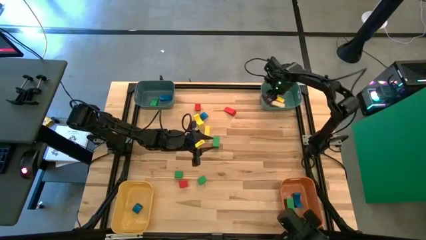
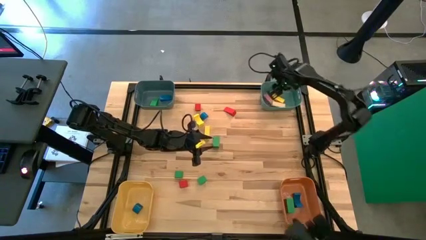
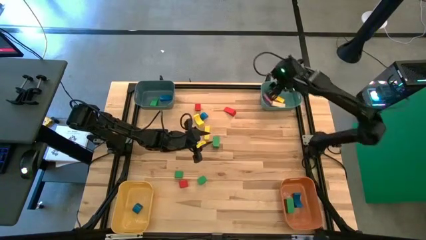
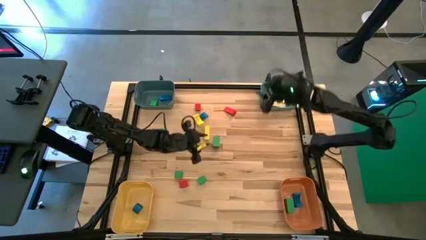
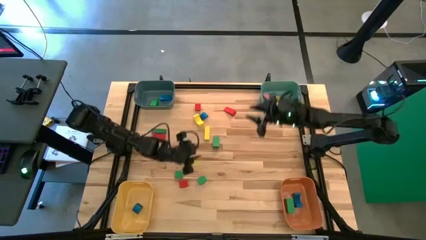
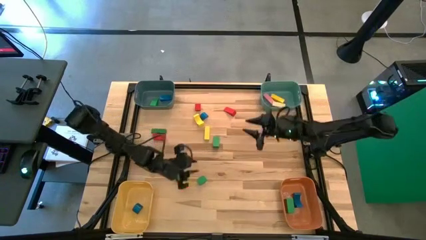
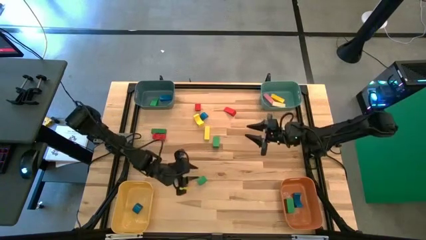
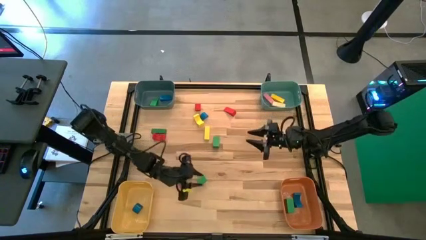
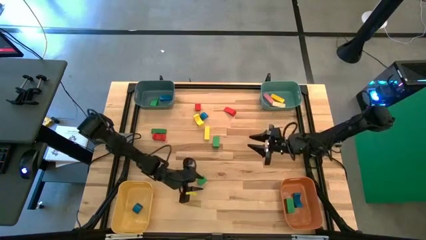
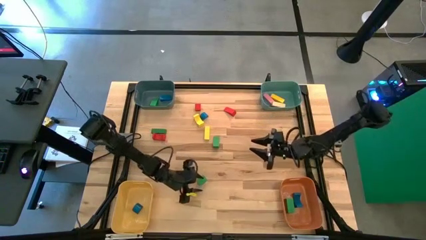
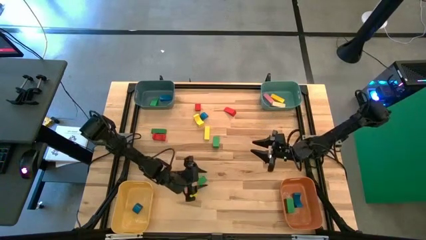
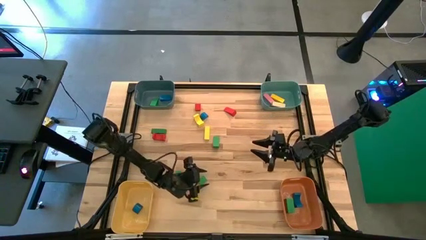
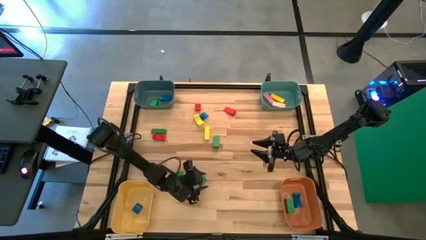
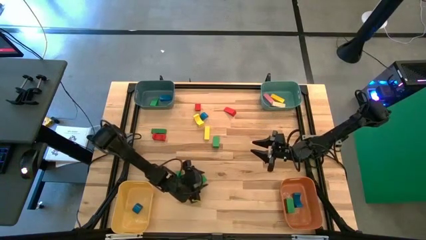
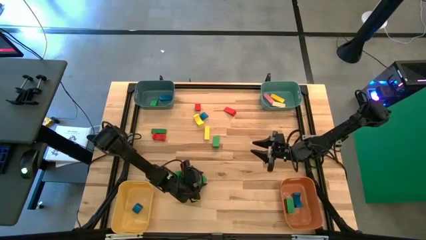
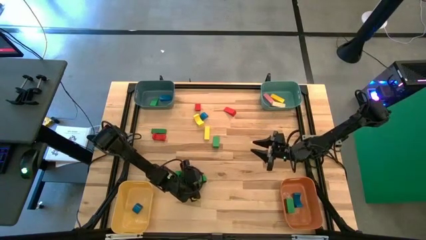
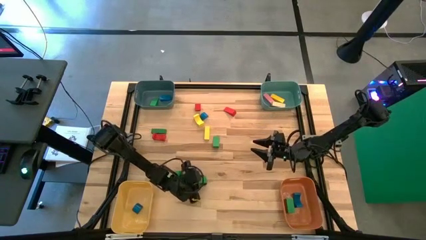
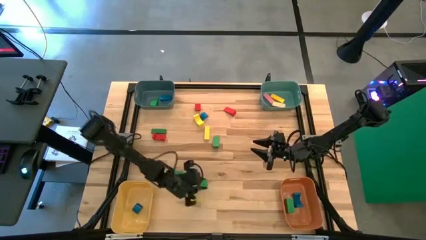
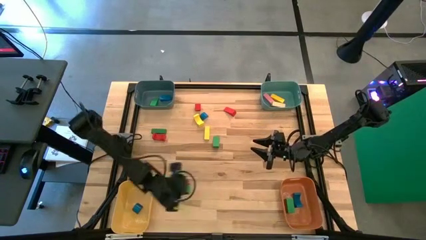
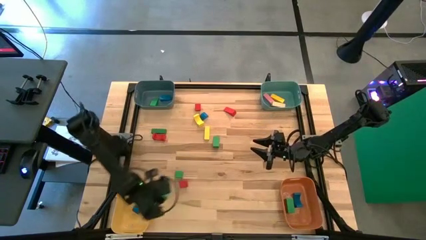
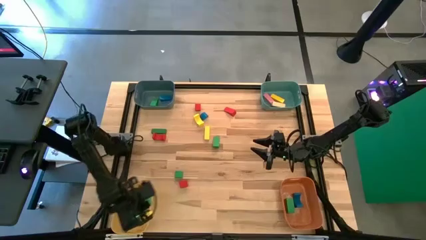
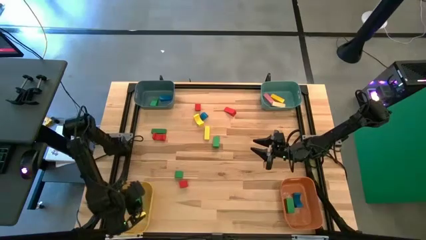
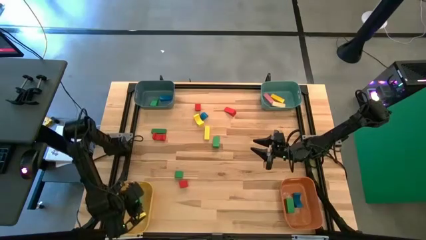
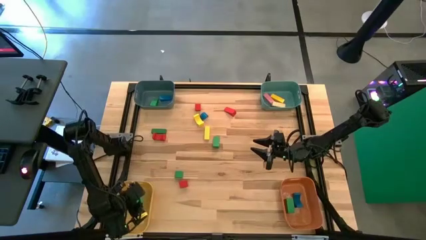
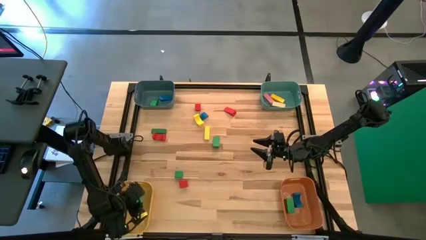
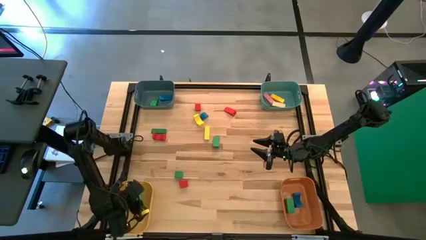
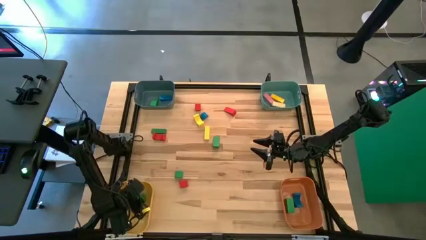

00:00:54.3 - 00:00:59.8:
Task: Sort blocks by size
Put the right green half-circle block into the yellow bin

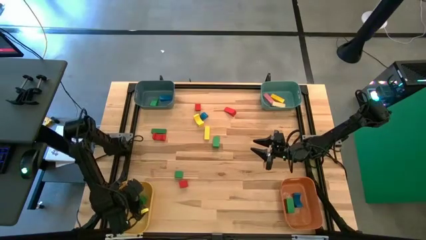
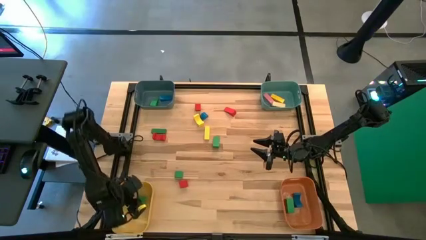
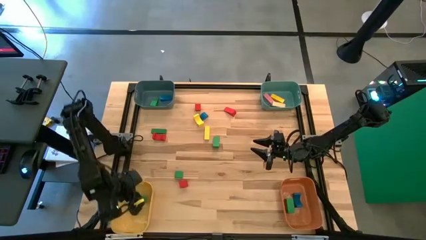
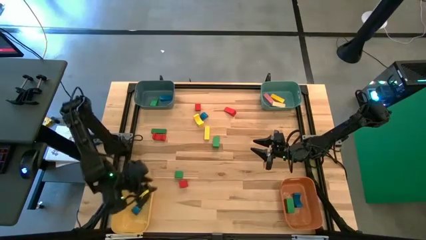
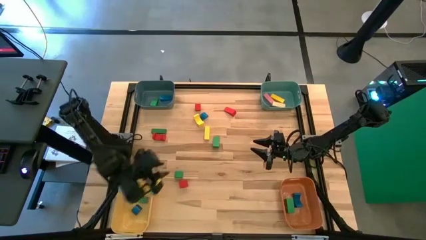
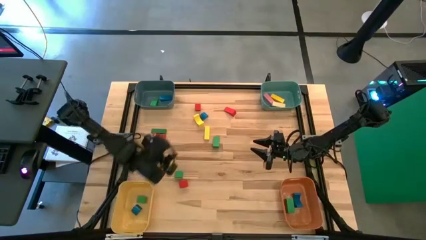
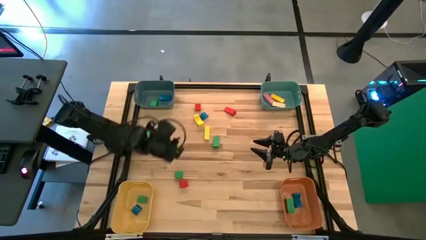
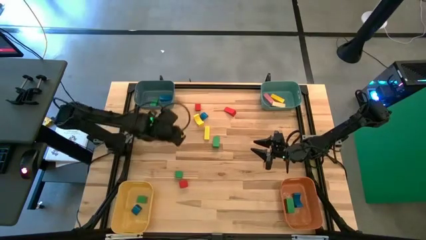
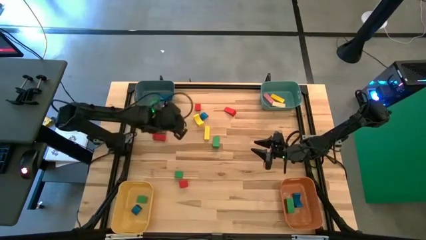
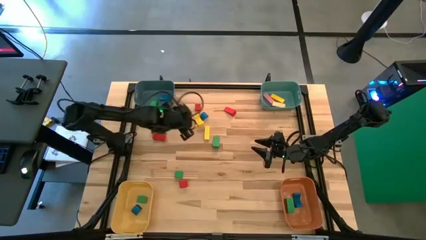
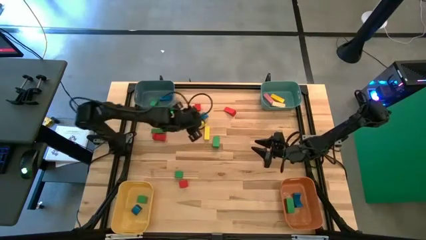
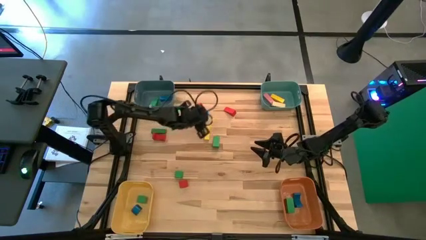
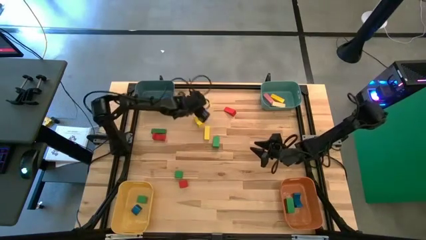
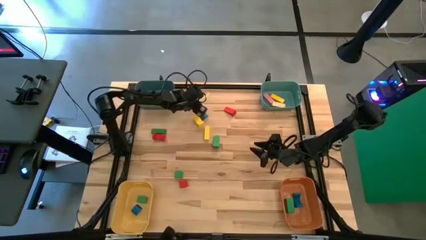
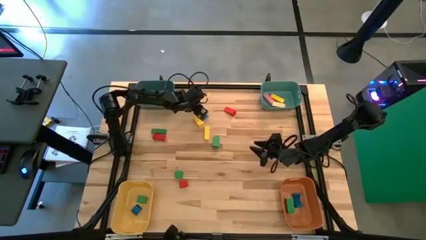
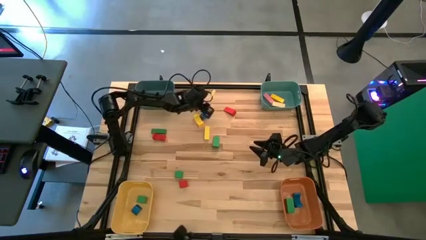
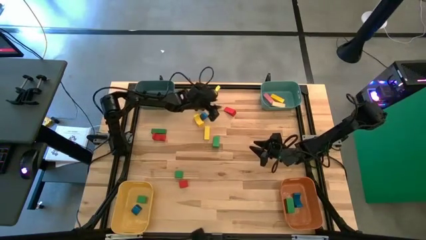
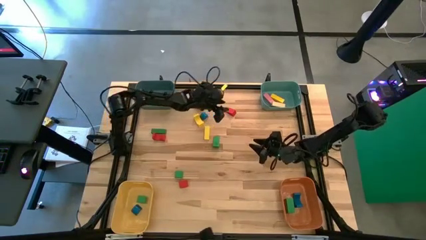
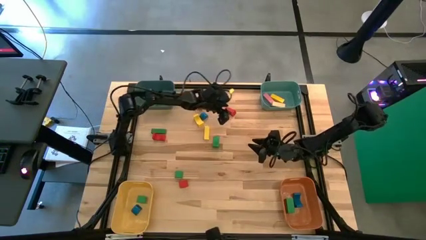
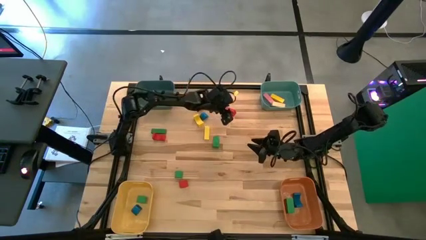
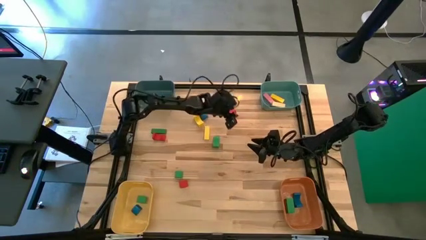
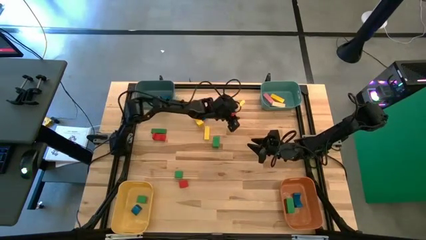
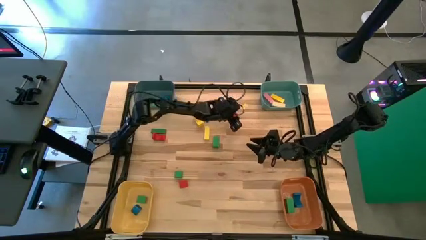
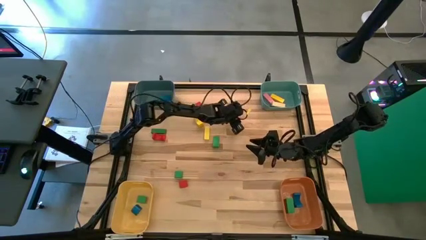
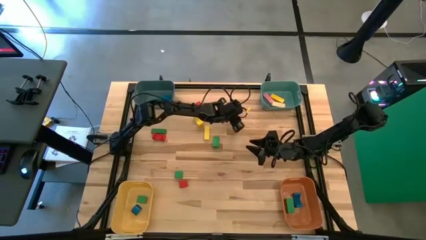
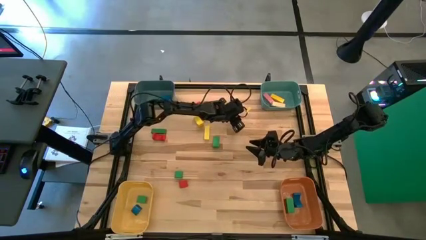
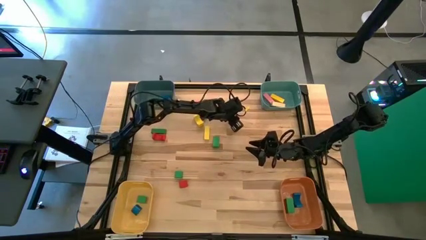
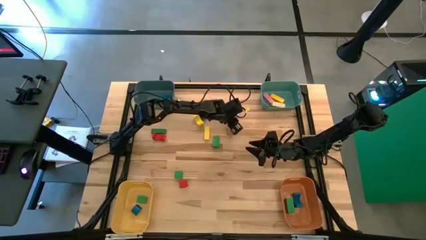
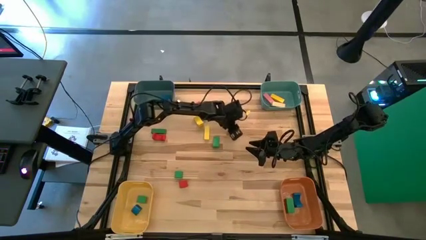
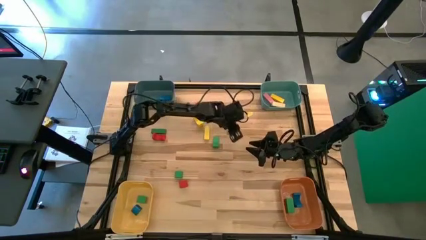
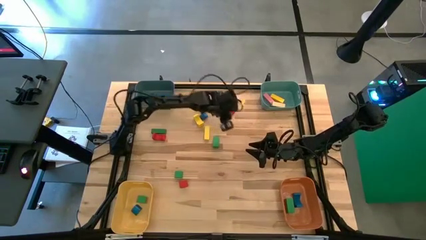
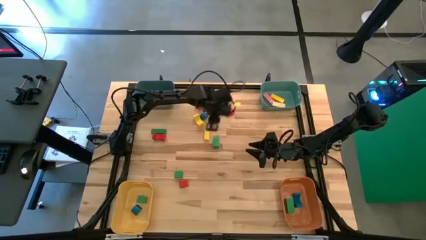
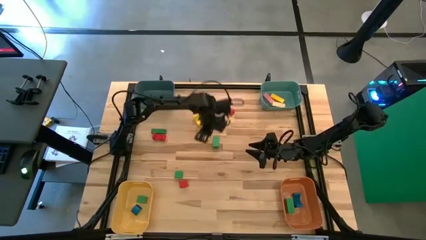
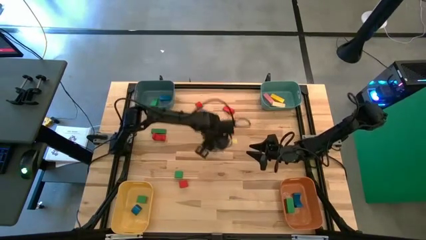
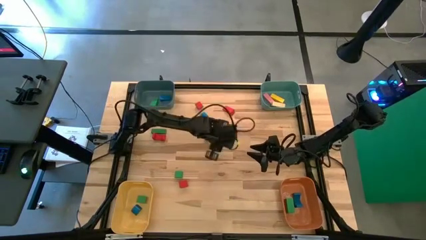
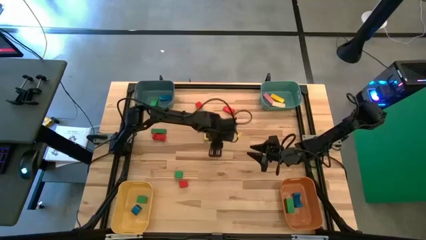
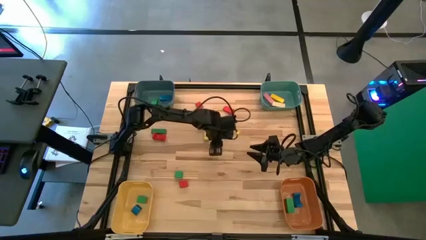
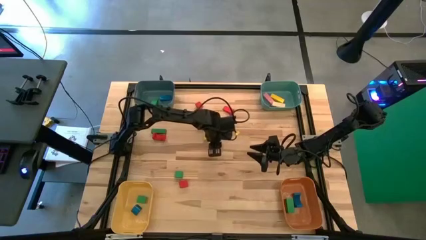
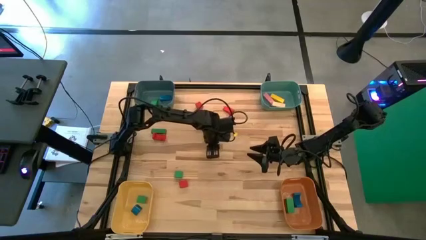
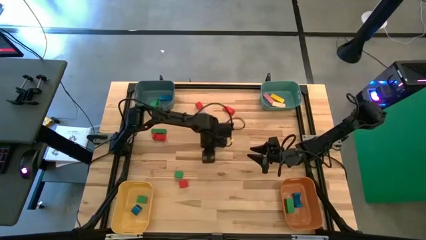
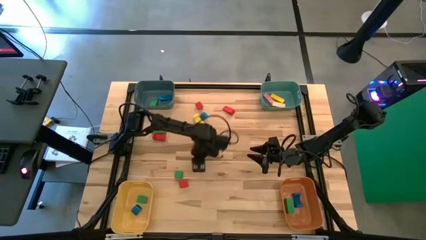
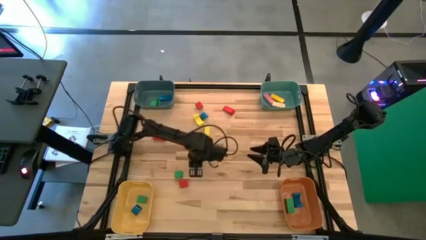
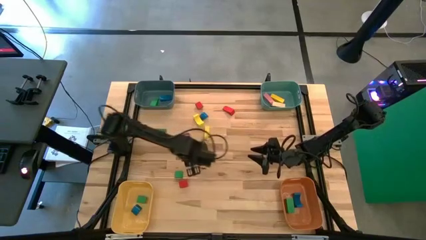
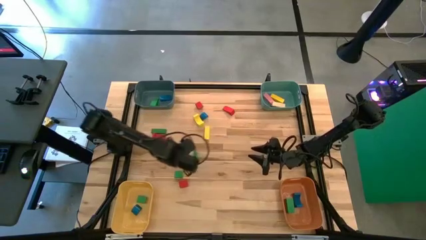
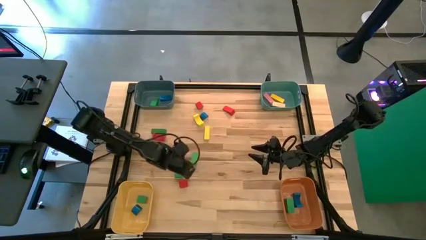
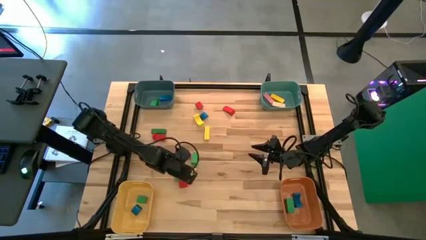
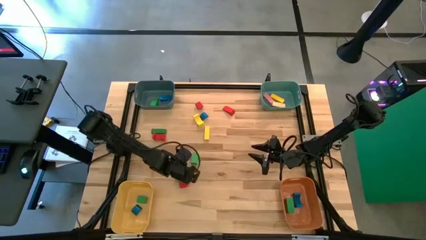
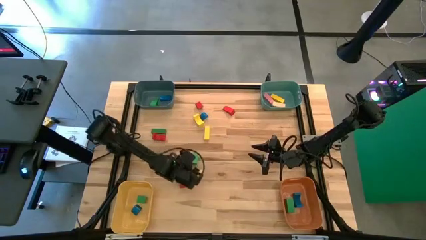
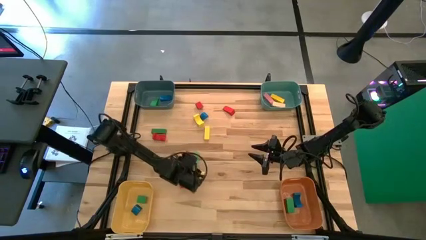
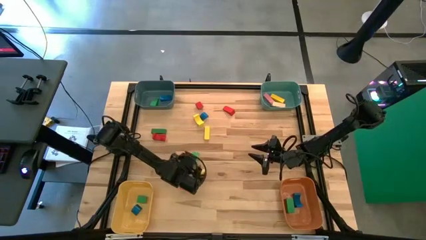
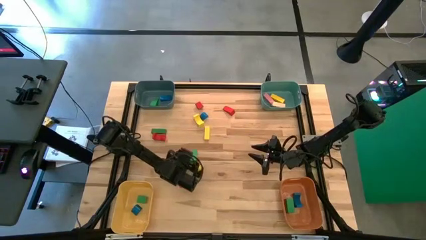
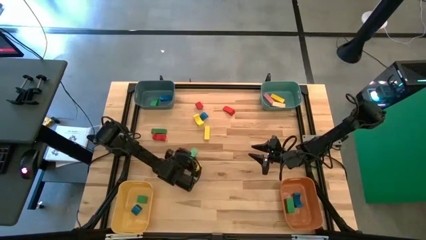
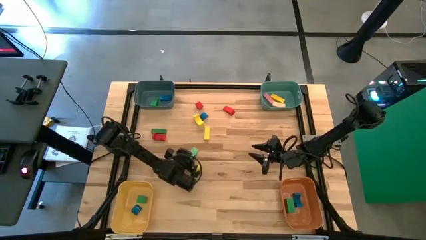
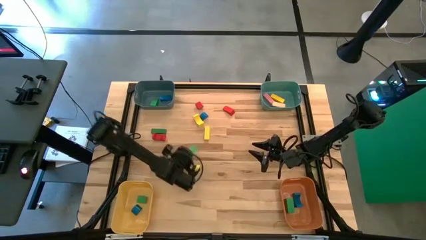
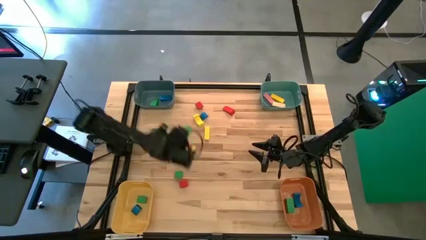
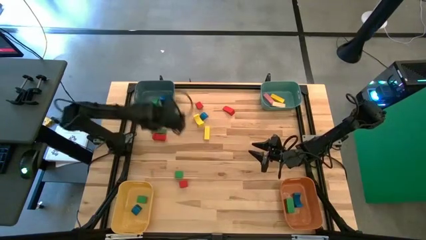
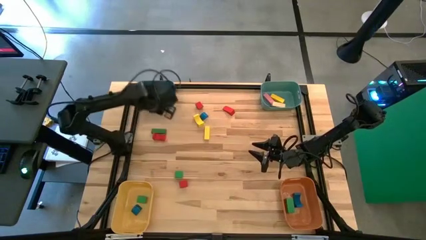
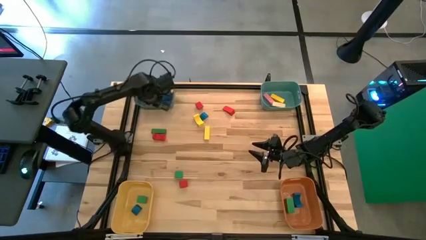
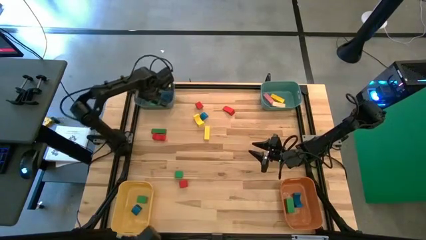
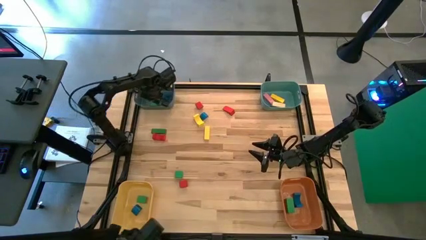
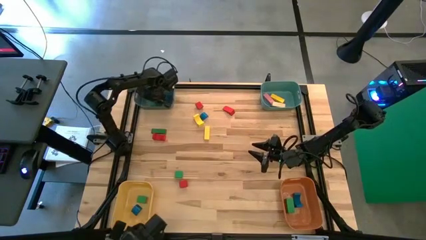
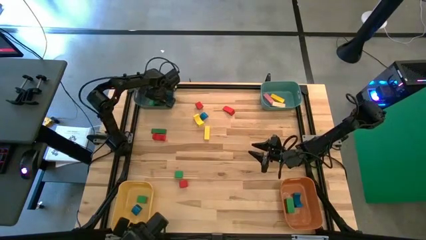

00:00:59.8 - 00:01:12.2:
Put the green triangular block into the blue bin
